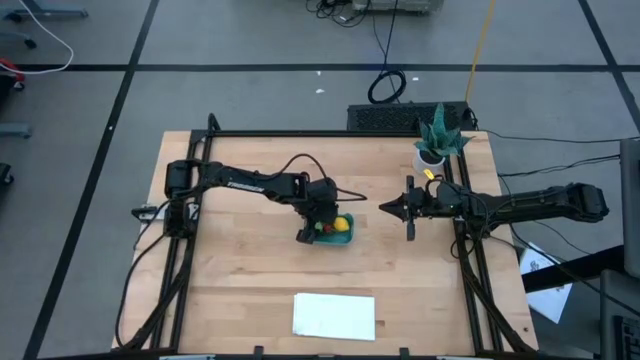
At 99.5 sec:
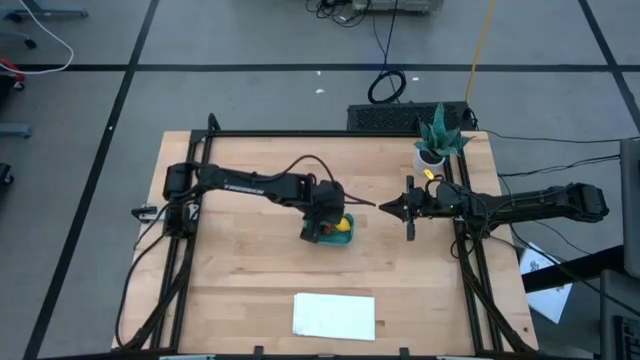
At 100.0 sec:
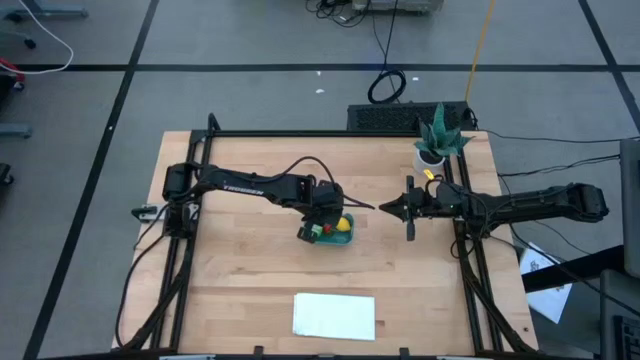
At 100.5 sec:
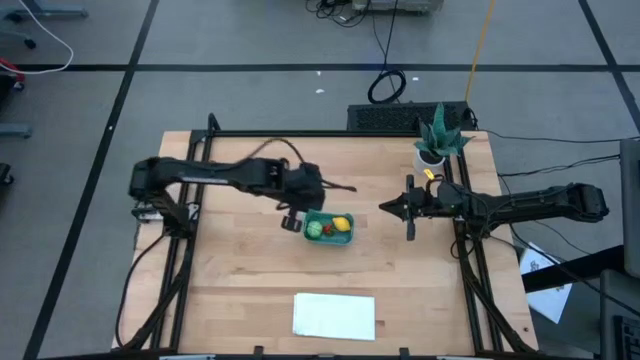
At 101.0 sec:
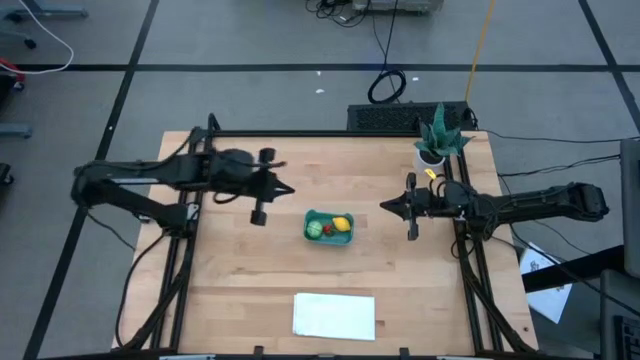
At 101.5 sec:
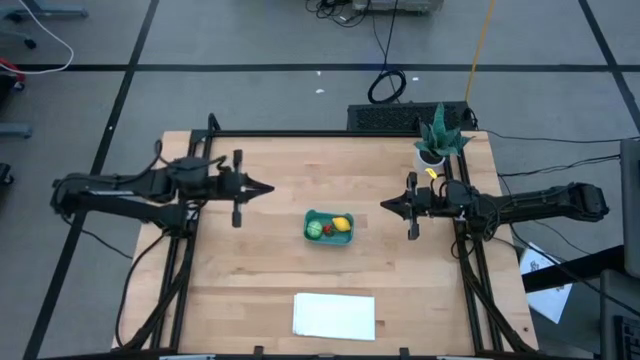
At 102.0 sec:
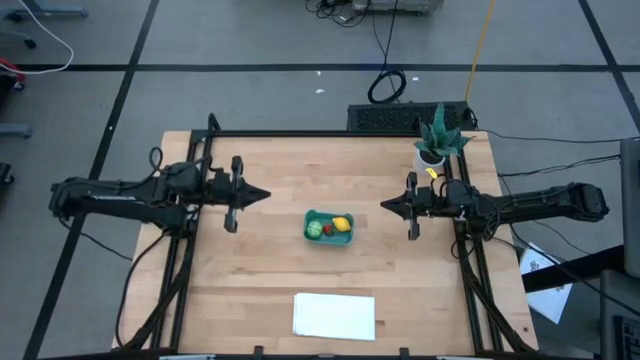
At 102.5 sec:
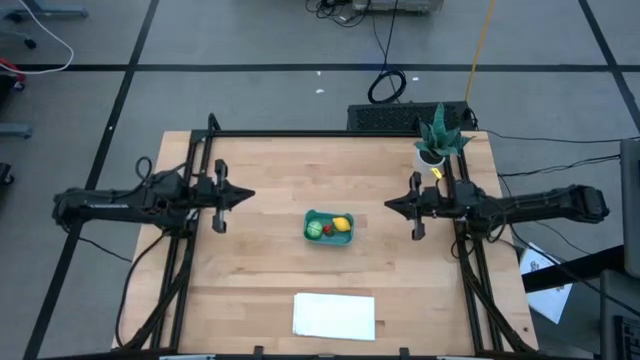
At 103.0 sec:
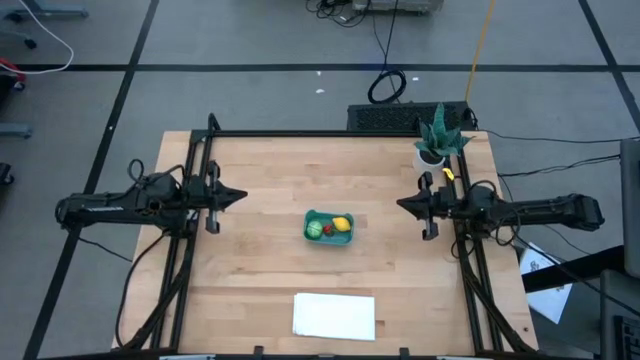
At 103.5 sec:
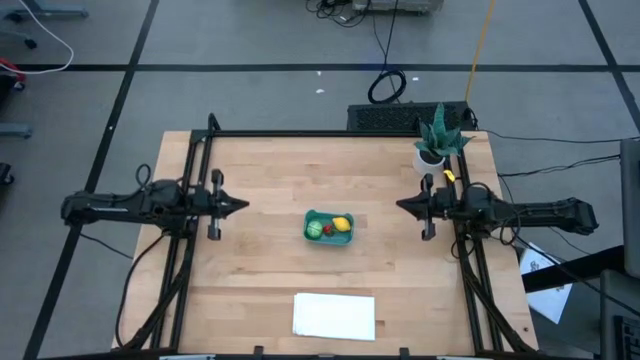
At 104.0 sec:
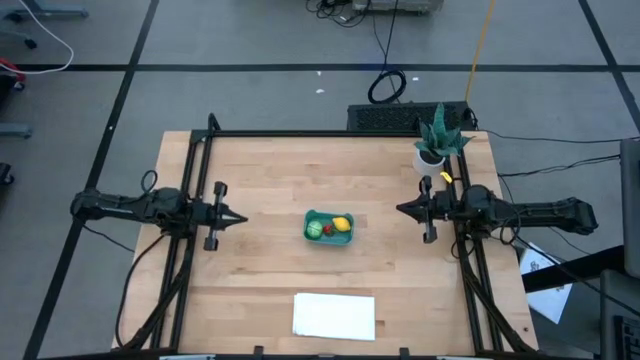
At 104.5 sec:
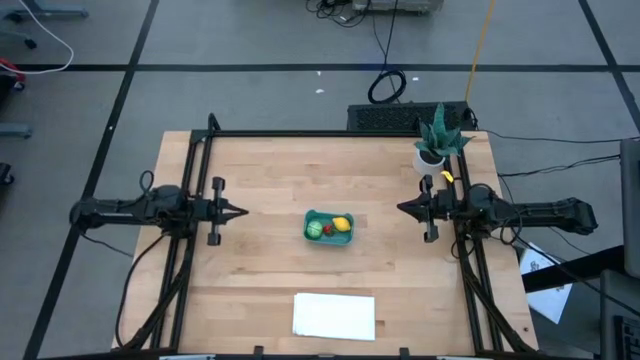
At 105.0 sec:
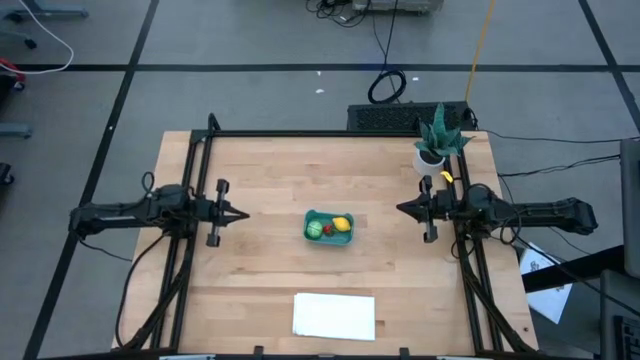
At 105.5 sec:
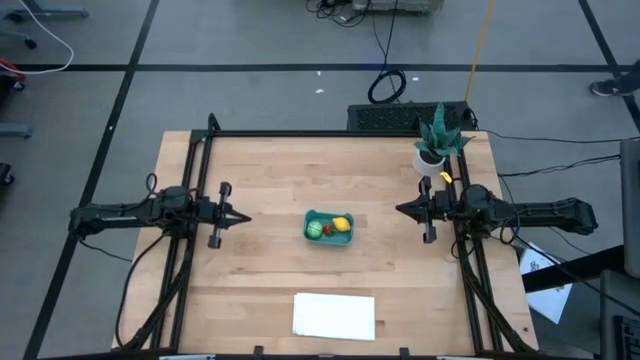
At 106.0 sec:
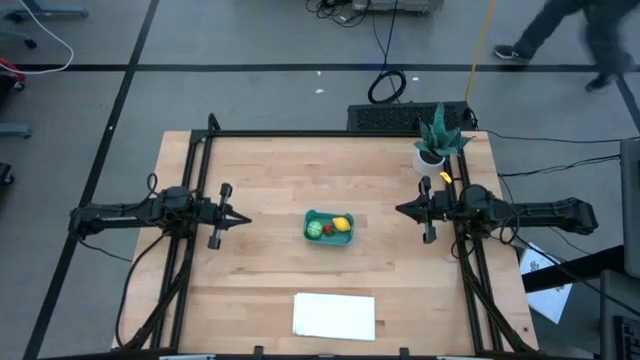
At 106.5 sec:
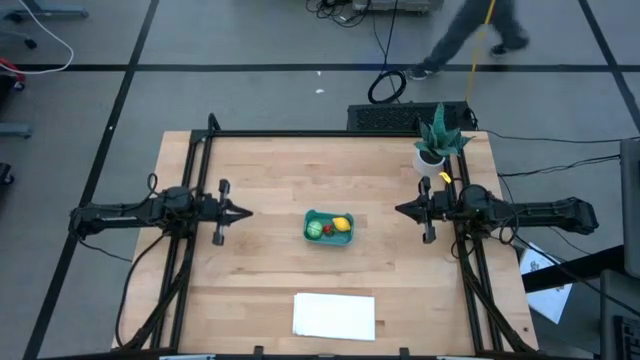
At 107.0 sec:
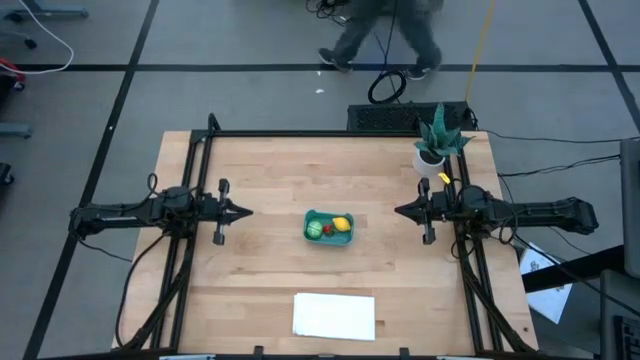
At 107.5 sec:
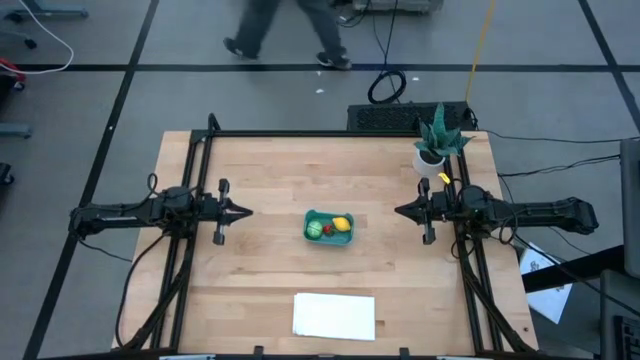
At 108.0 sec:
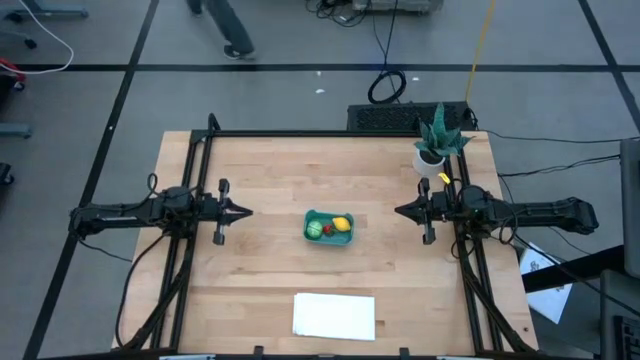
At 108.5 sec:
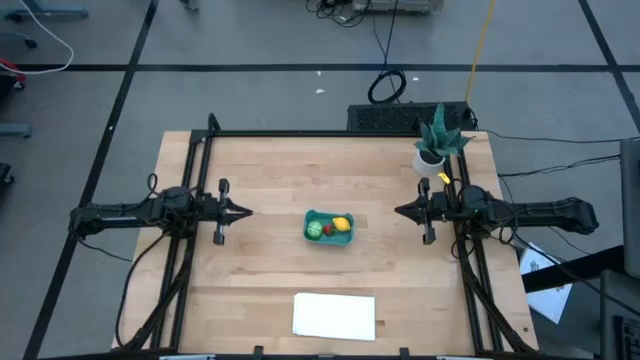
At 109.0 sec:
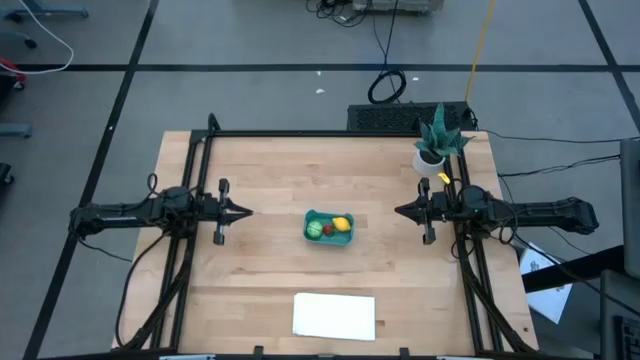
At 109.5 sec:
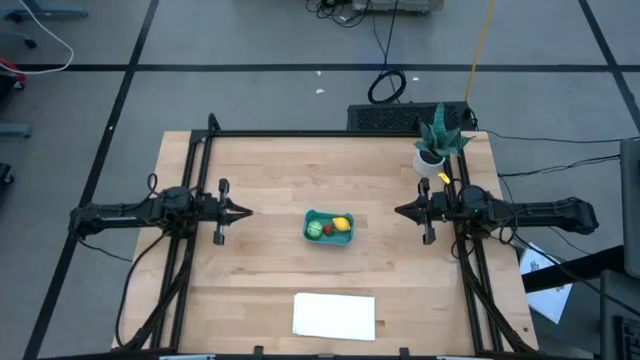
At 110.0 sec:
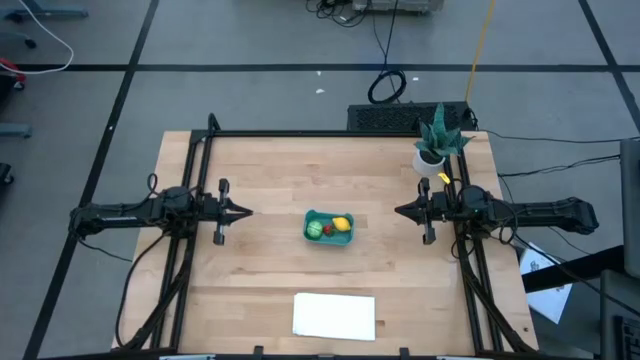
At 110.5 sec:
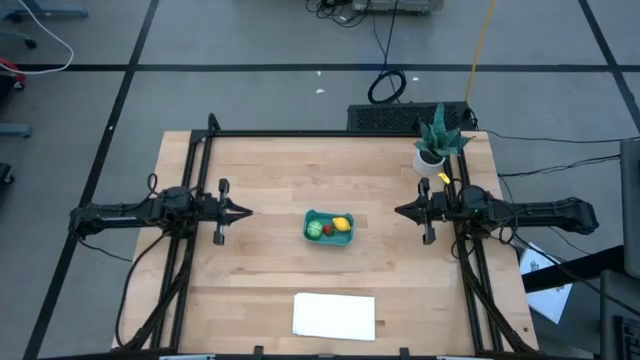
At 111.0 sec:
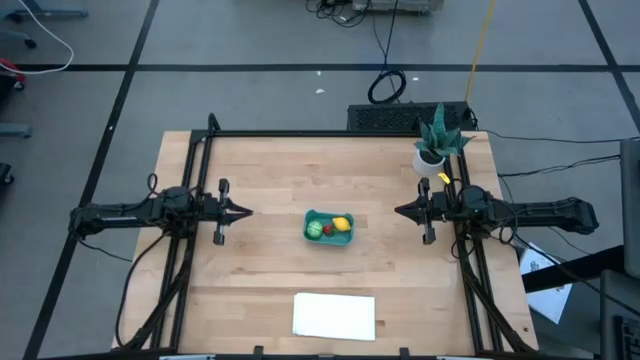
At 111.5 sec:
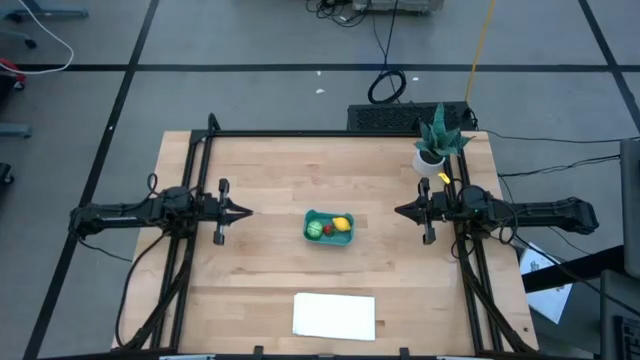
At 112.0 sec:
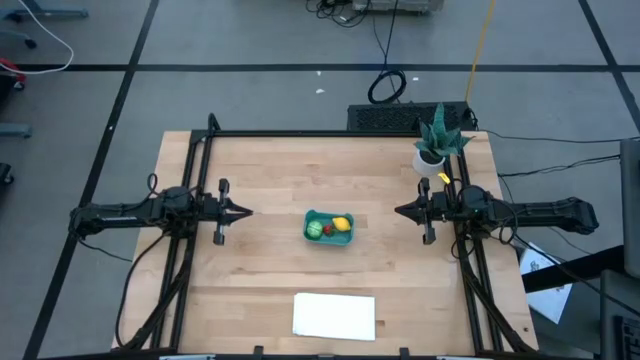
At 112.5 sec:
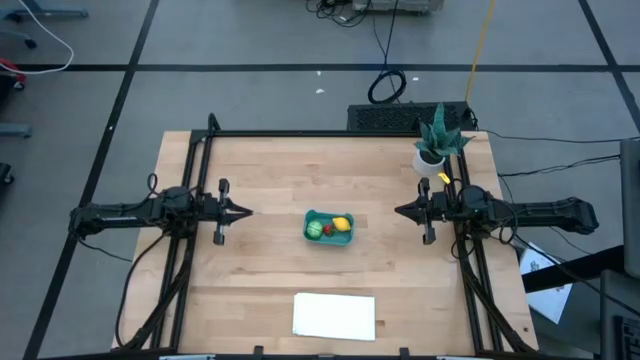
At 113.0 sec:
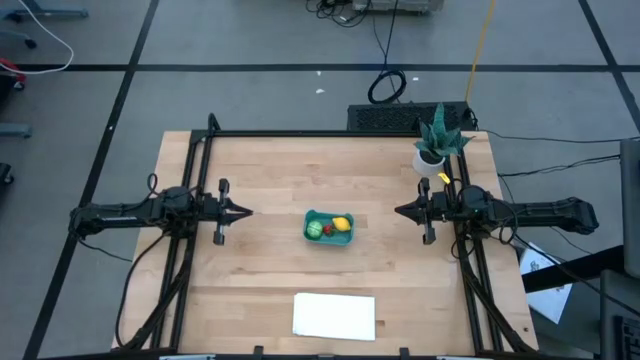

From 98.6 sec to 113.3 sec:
Task: Pick and placing Produce into tupperware
Return to Home Position

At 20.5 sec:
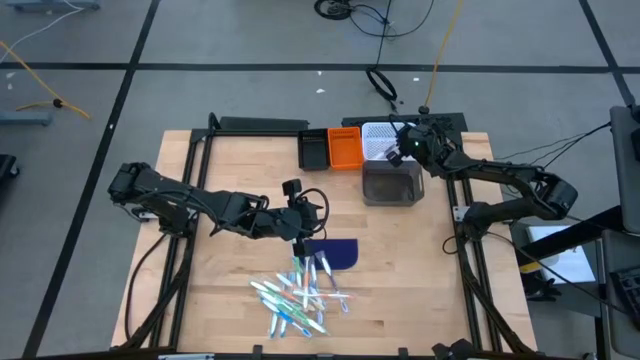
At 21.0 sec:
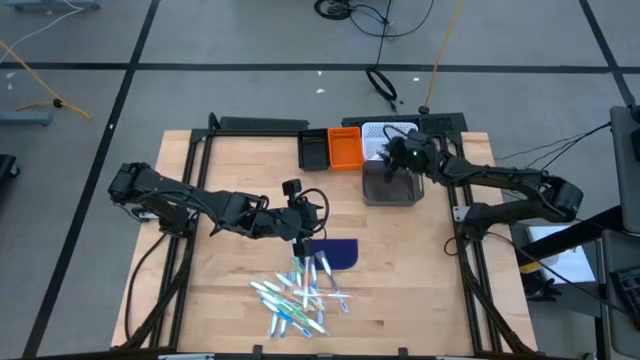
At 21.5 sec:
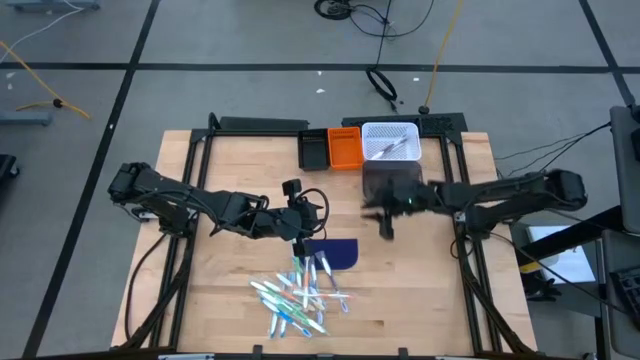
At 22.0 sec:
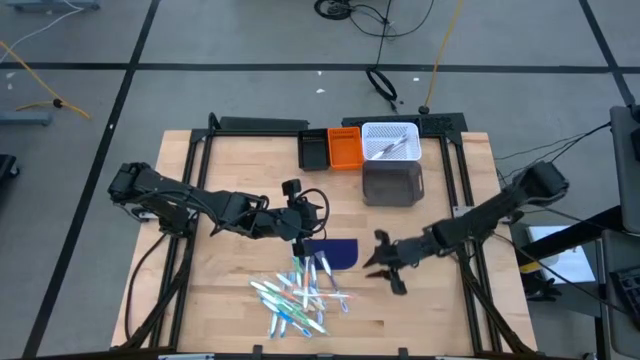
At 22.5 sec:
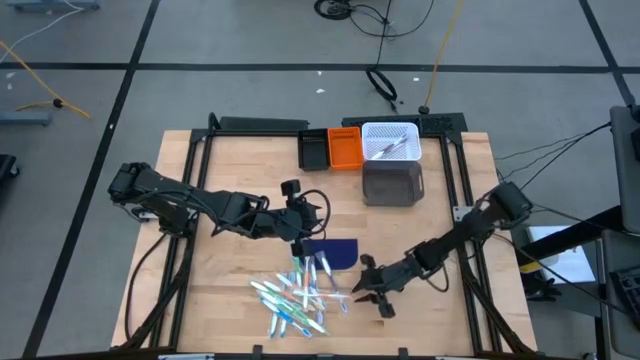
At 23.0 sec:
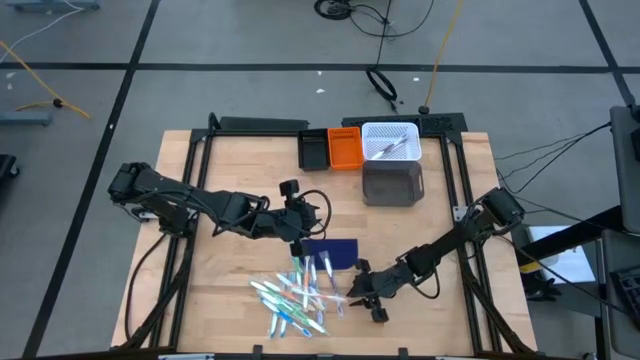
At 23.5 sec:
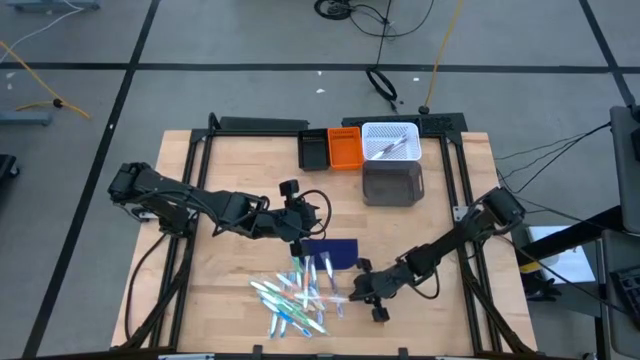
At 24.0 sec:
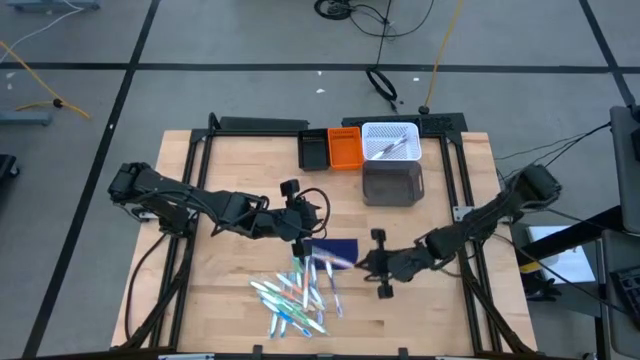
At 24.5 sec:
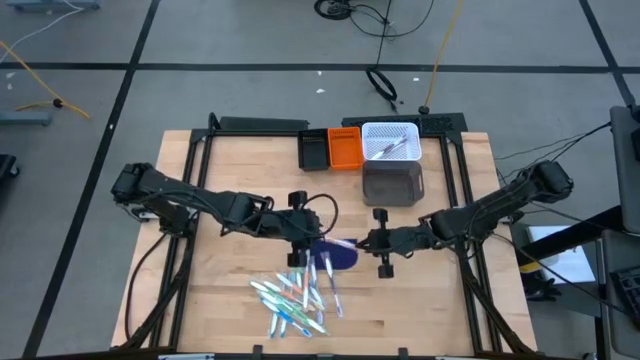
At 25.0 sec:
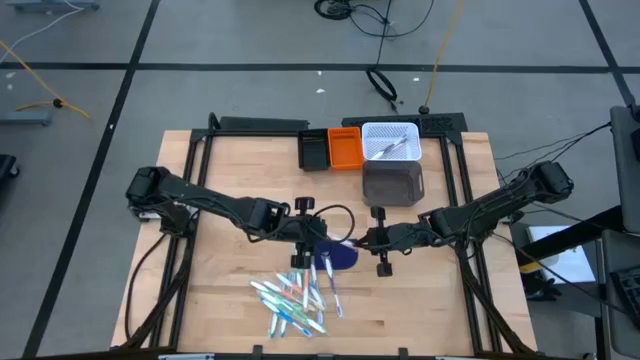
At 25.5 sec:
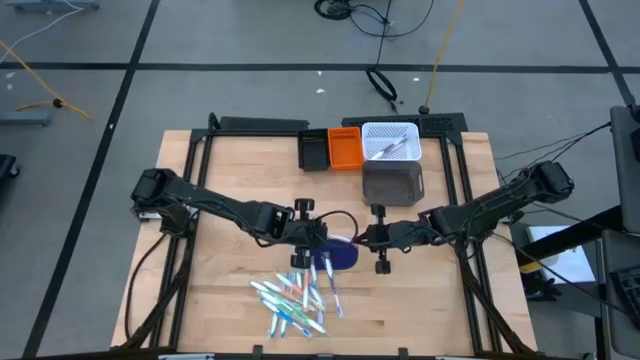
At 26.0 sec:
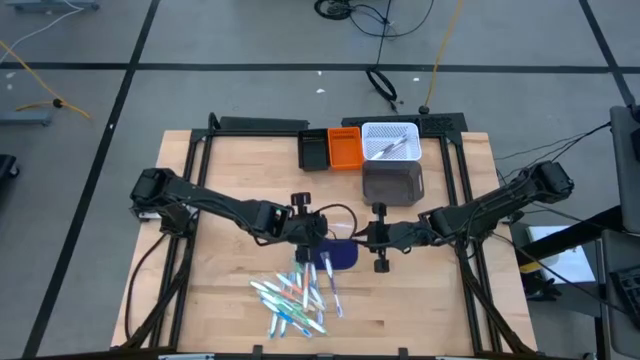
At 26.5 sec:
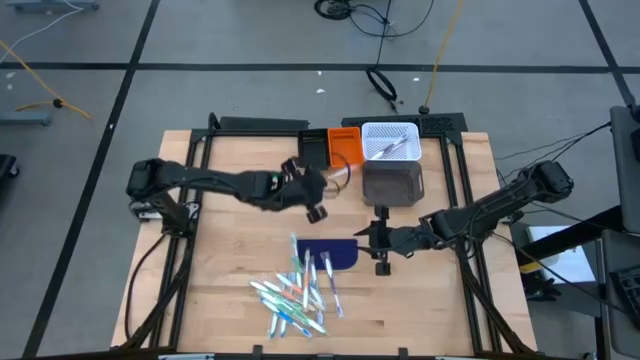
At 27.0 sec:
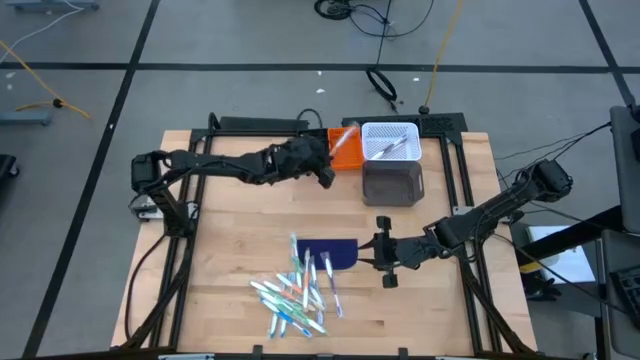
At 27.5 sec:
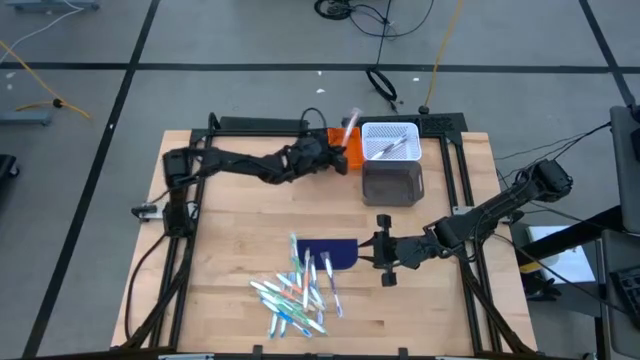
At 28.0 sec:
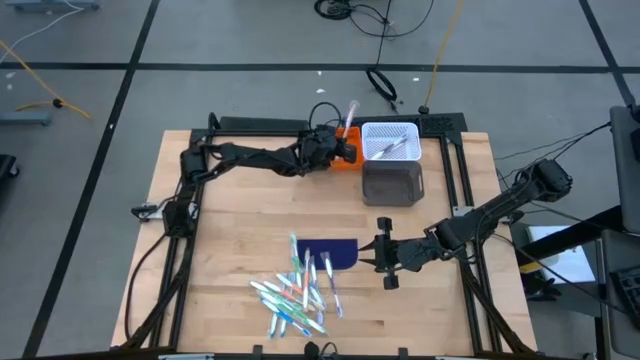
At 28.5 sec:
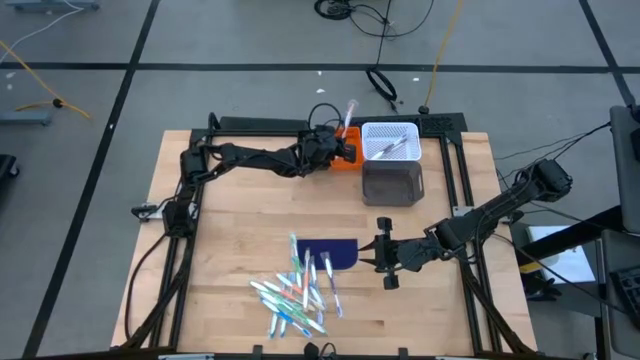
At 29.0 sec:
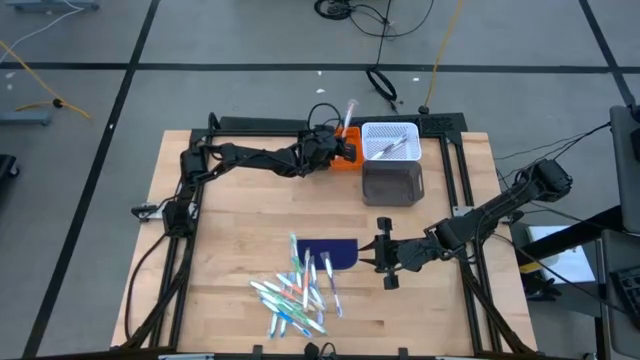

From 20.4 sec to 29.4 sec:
Task: Pick & Place Toothbrushes
Put the orange toothbrush into the orange bin
